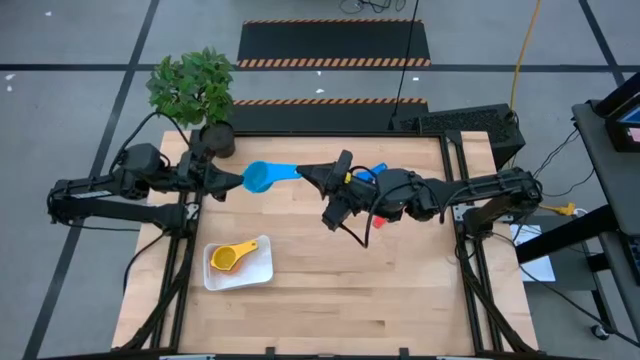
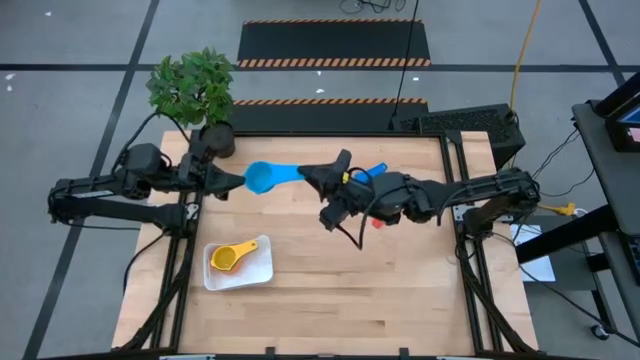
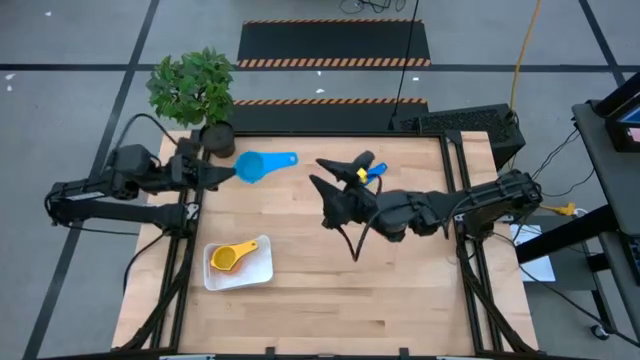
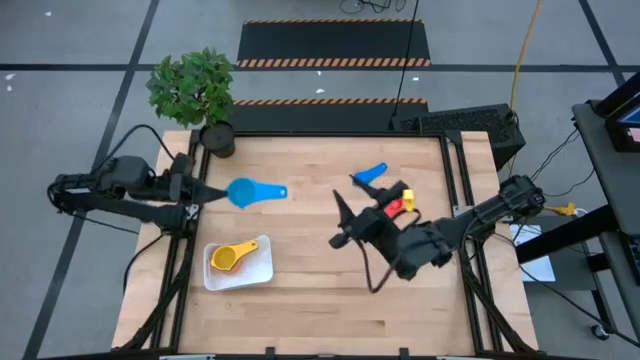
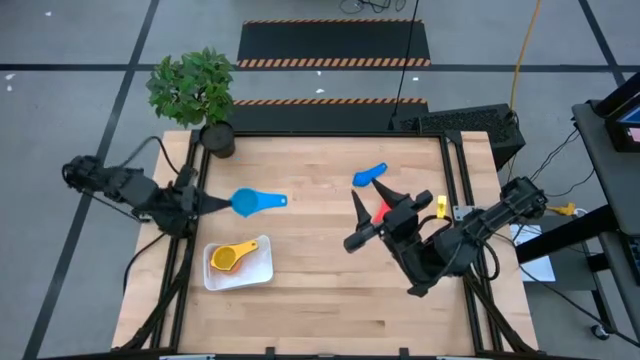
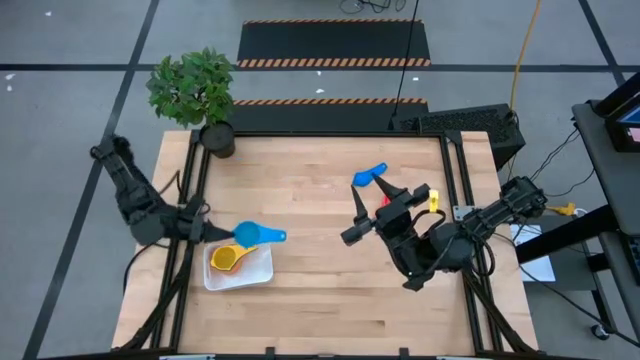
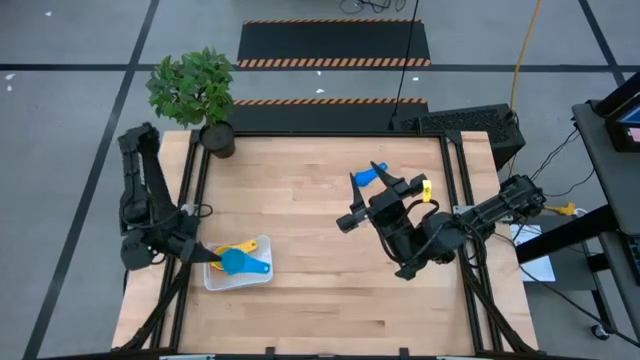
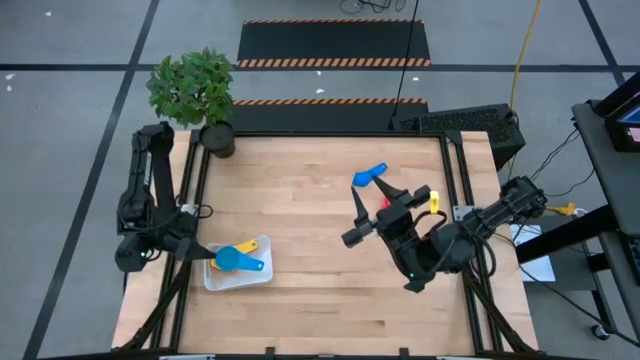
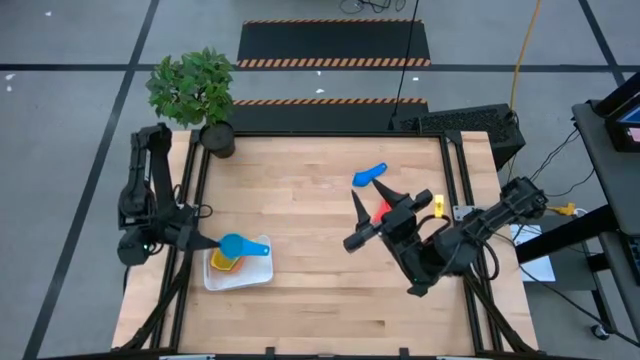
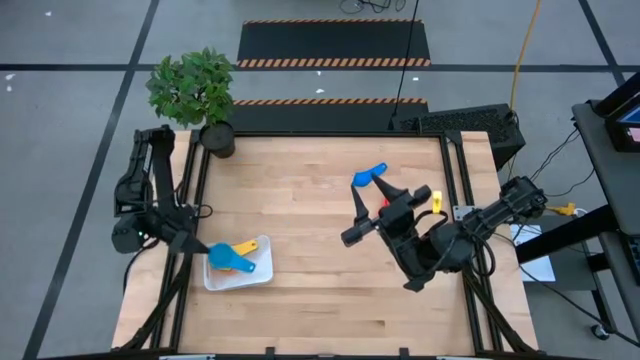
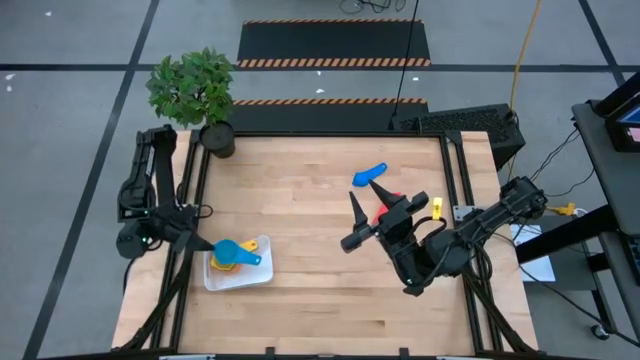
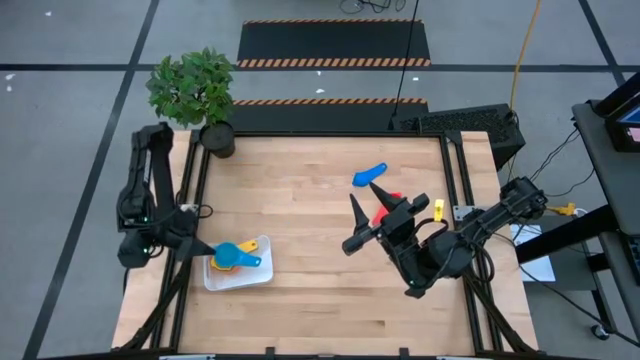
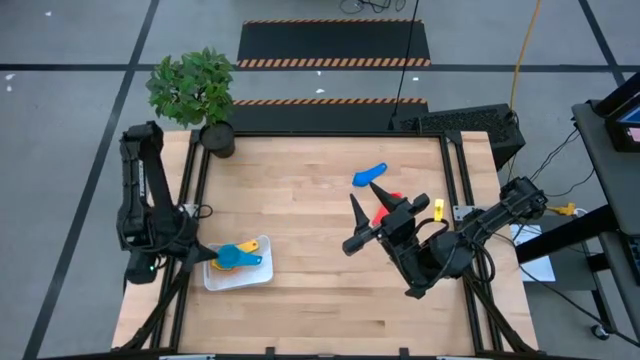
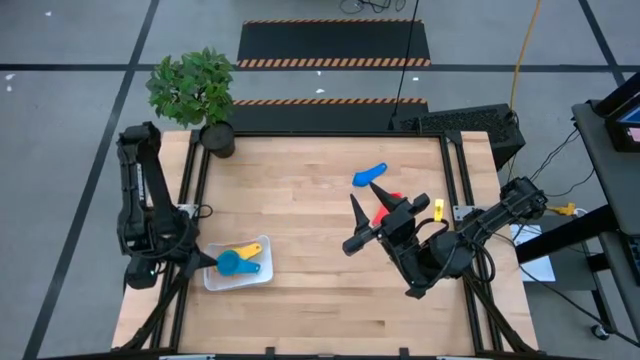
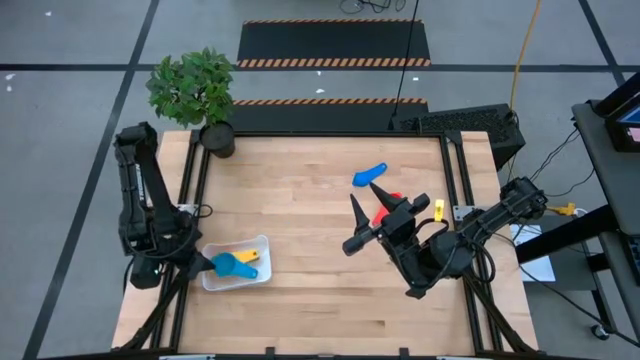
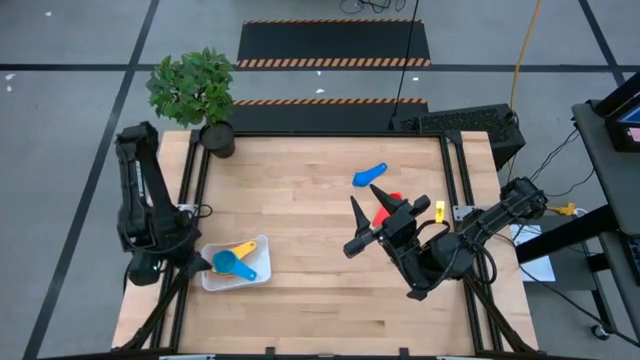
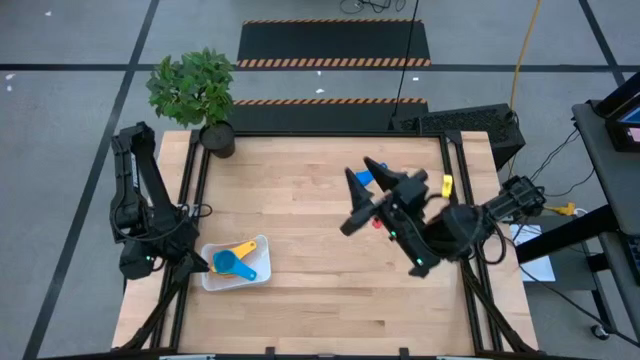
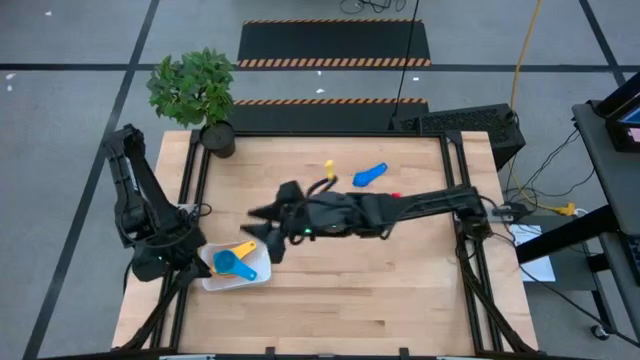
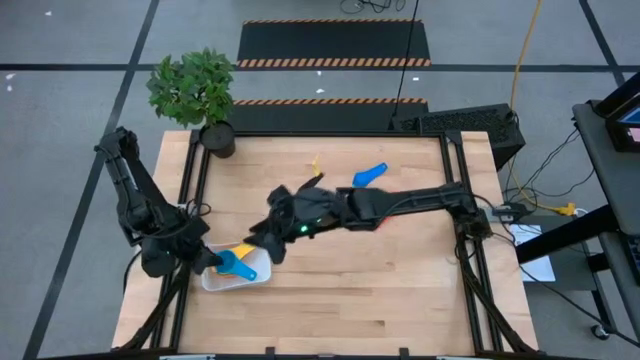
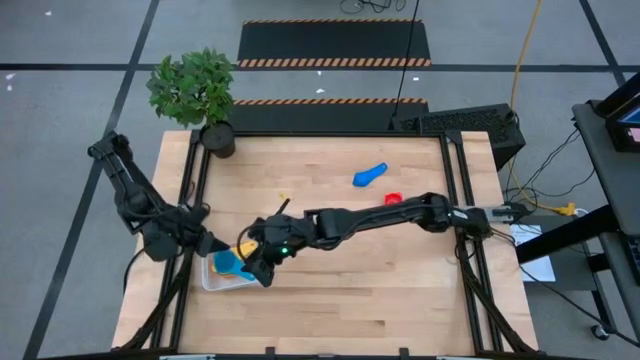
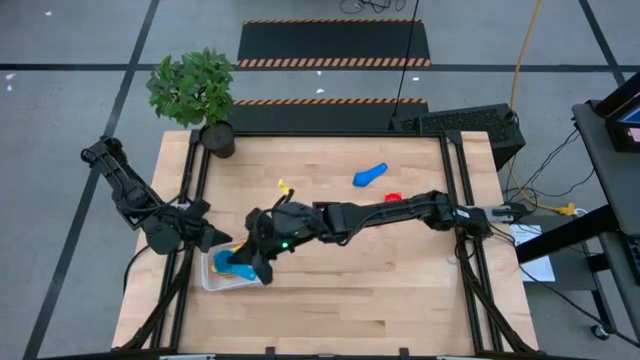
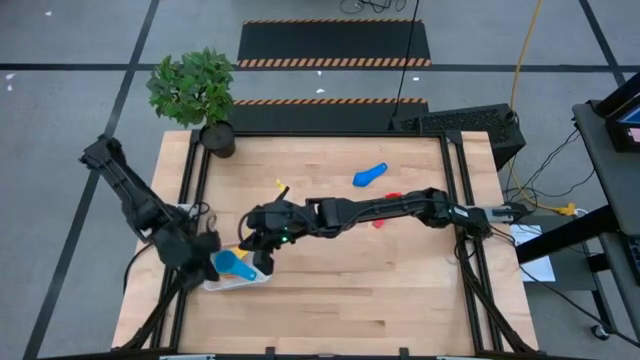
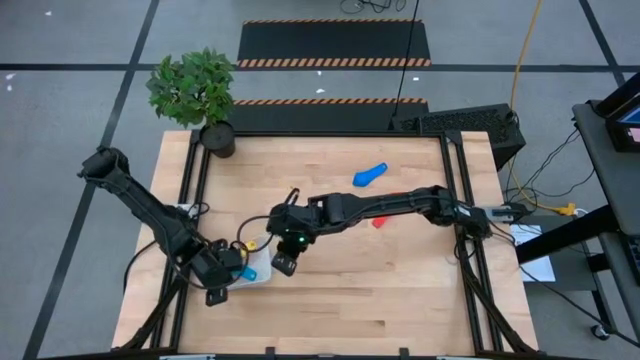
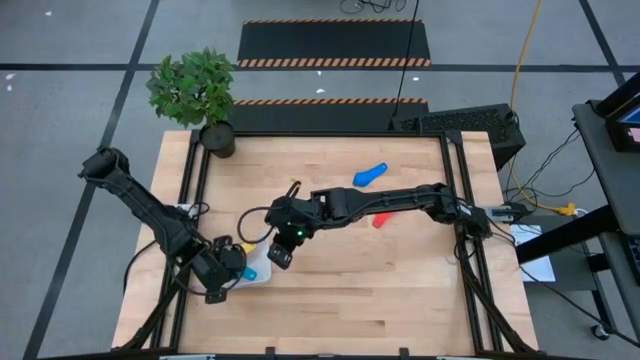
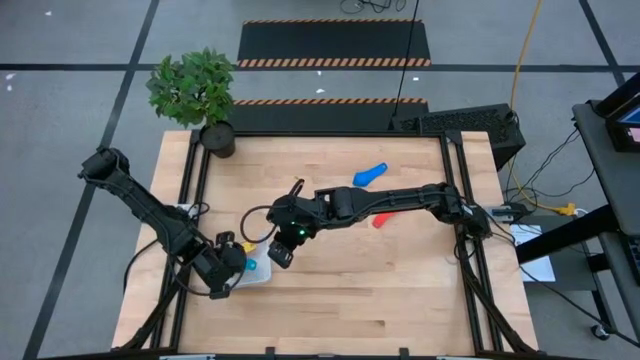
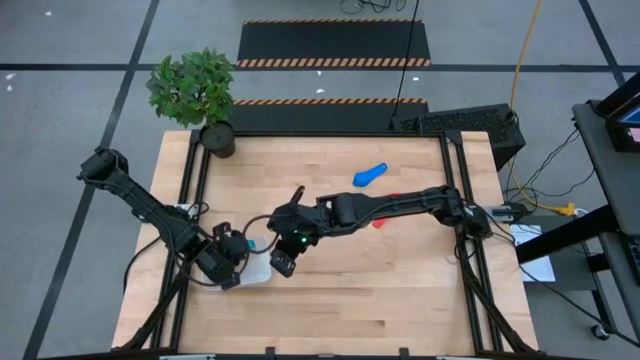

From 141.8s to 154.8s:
Task: Nest measuring cups in basket
Stack the light blue measuring cup on top of the yellow measuring cup in the white bin

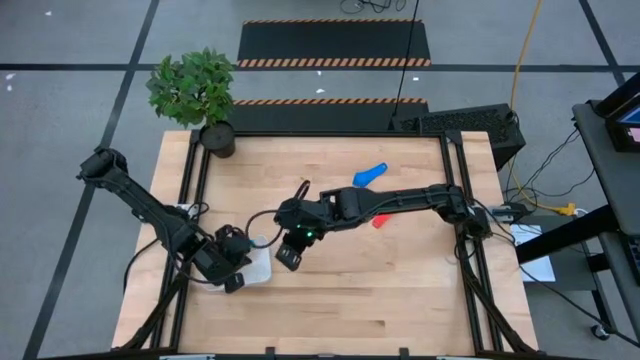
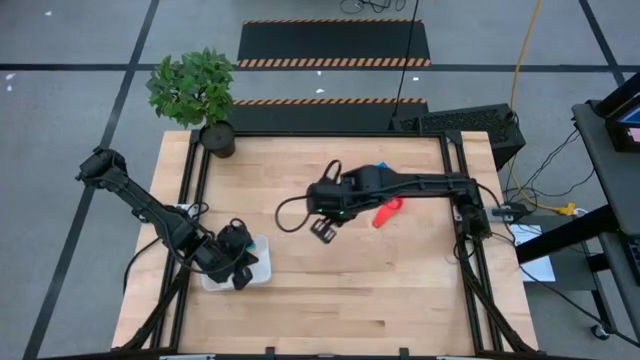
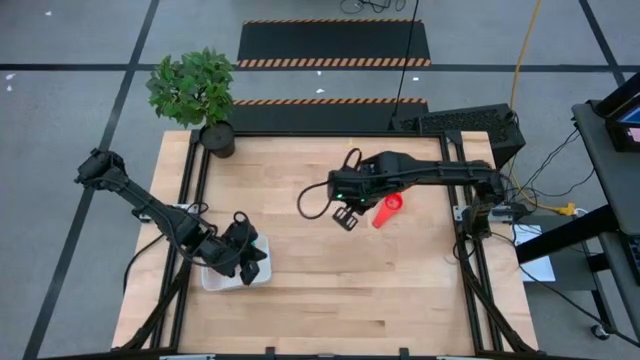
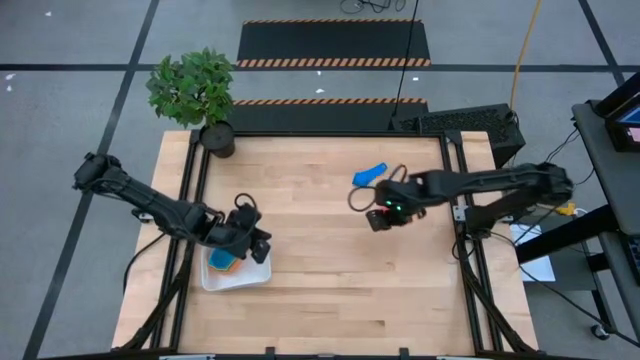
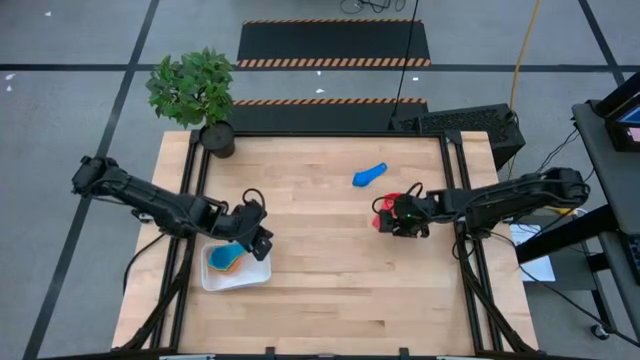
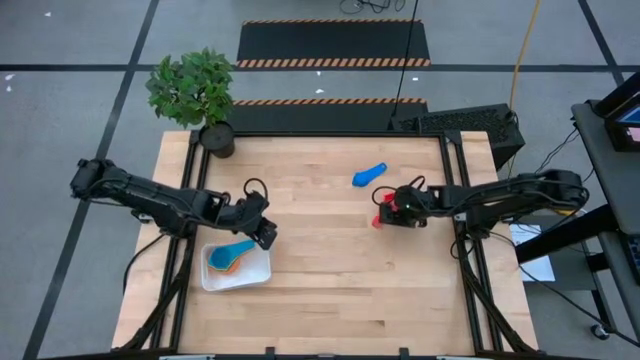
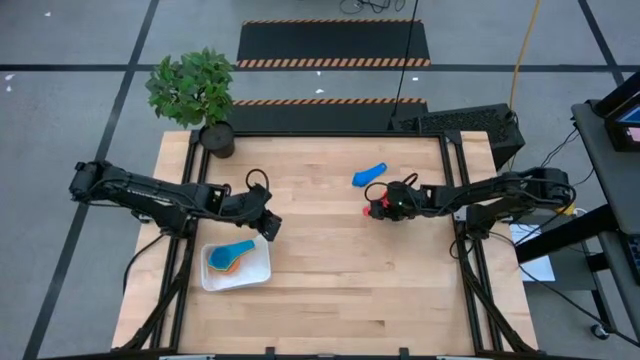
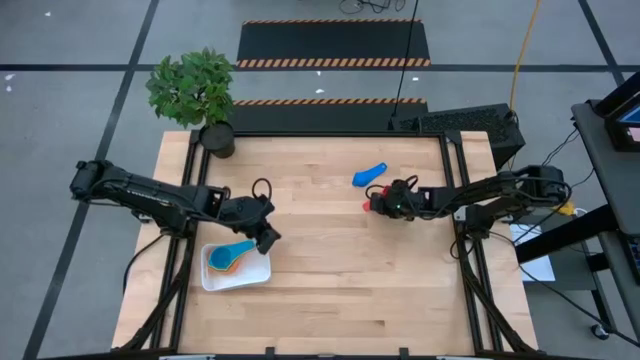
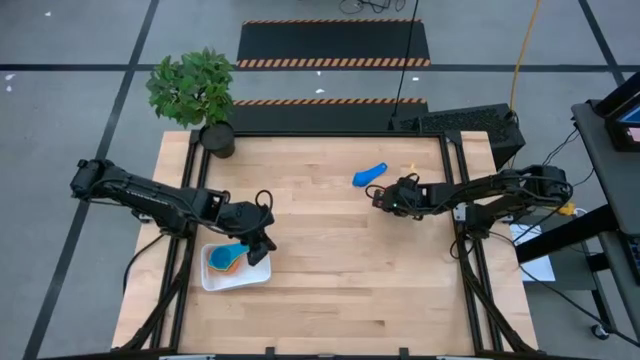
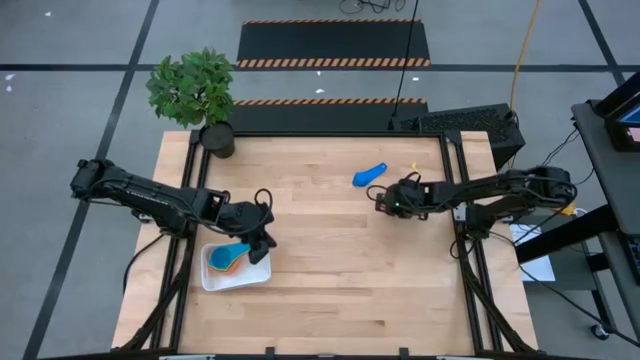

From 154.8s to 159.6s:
Stack the red measuring cup on top of the light blue measuring cup in the white bin

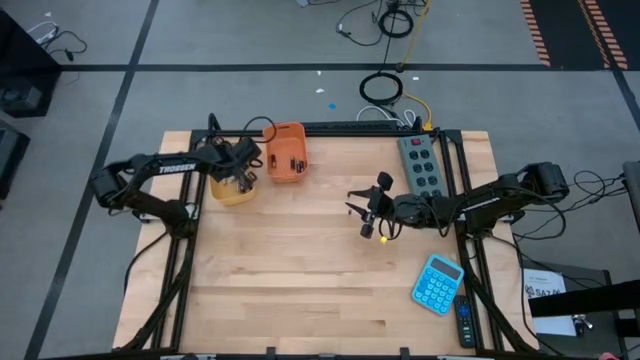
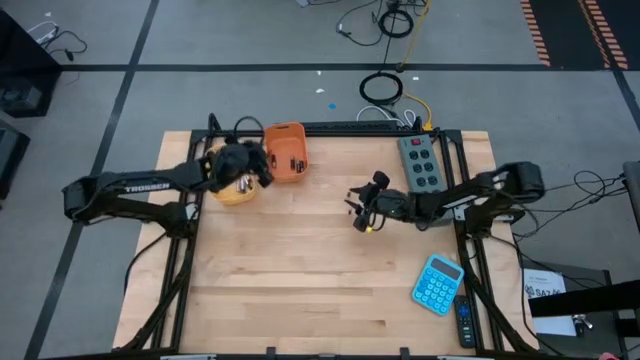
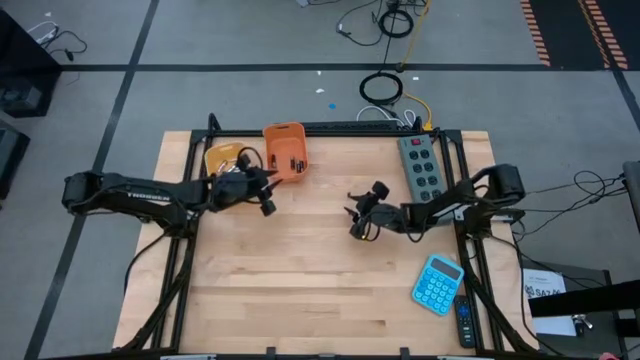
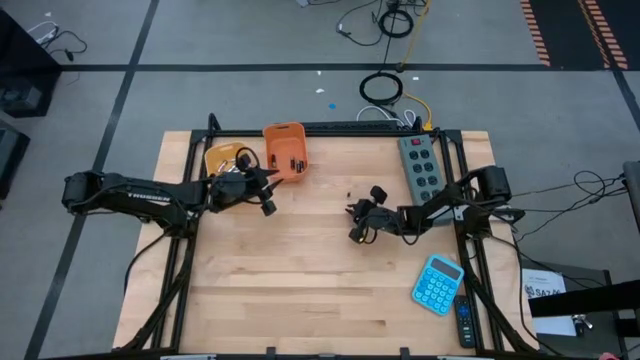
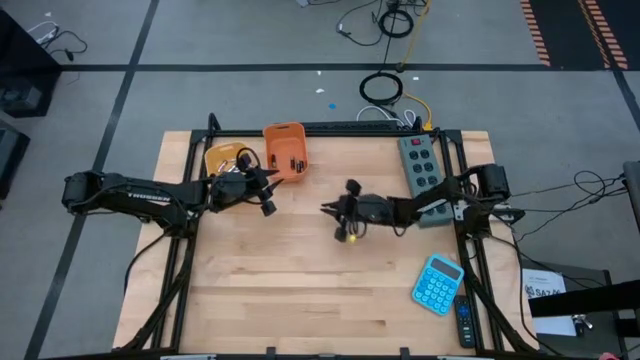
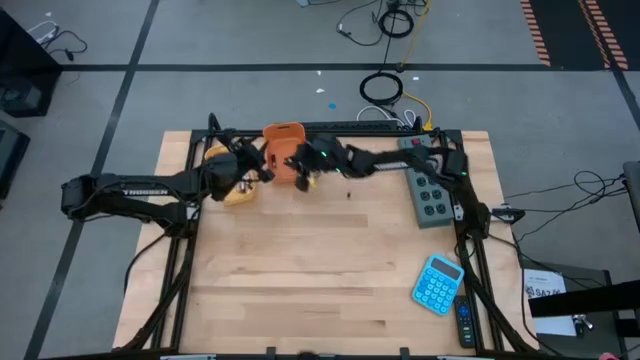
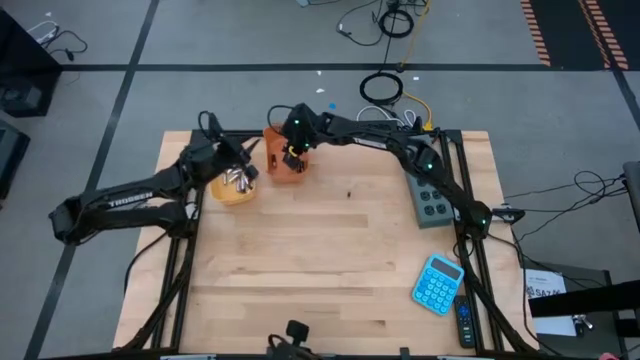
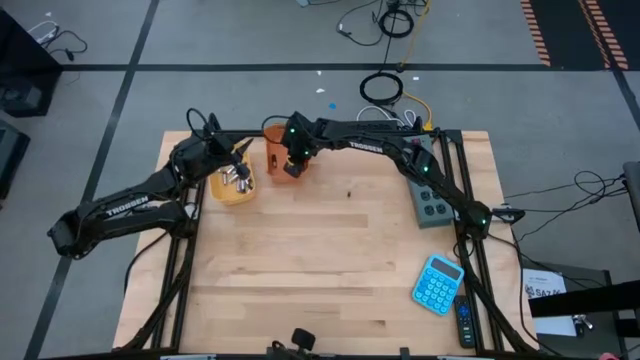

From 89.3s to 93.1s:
Task: Sort batteries
Put the black battery into the orange bin
